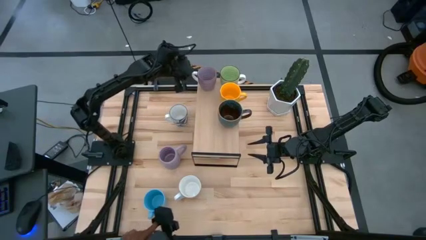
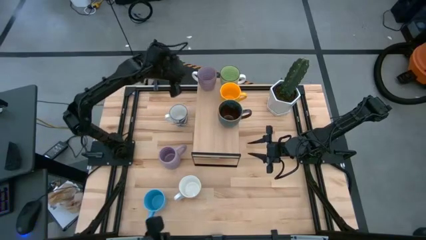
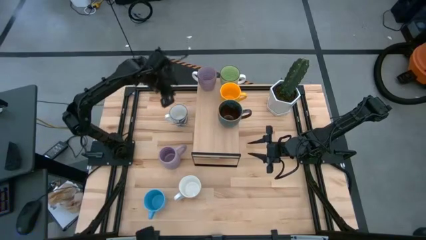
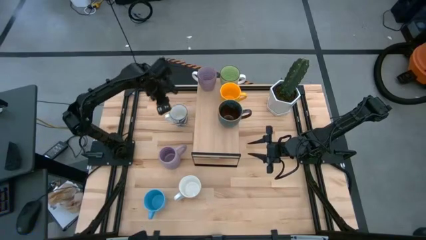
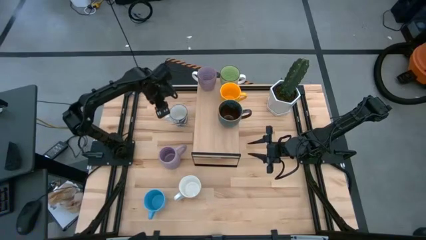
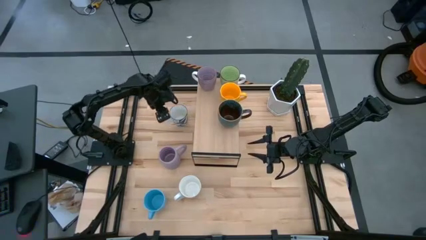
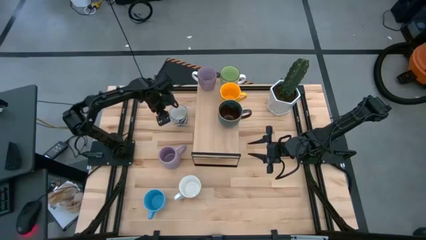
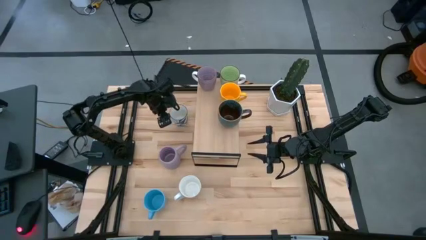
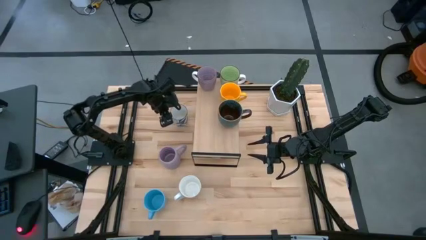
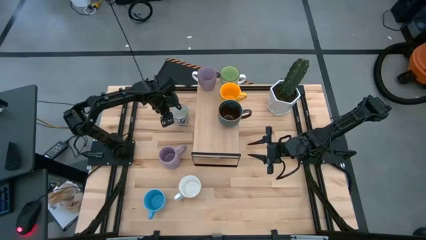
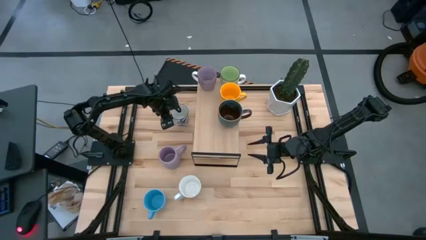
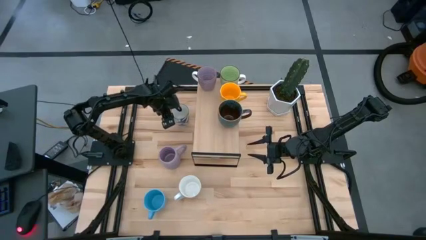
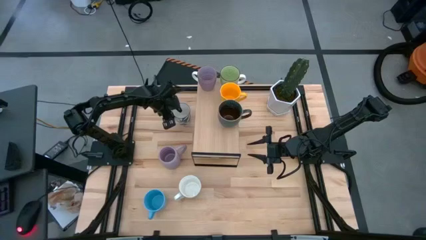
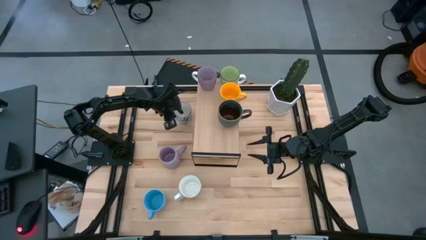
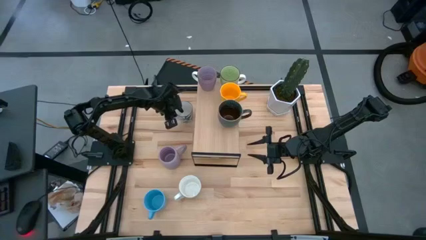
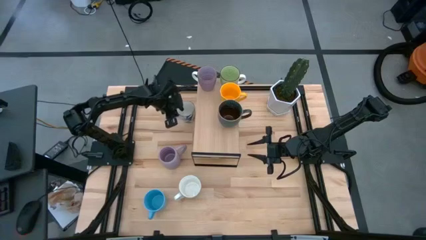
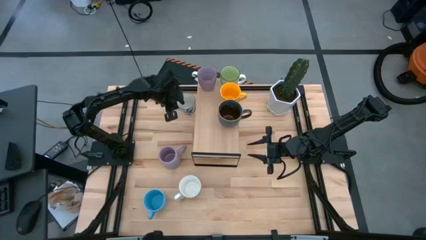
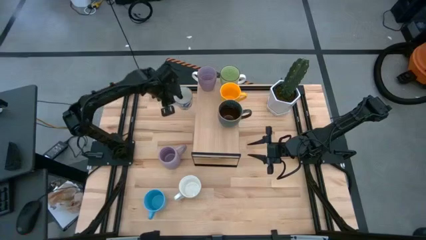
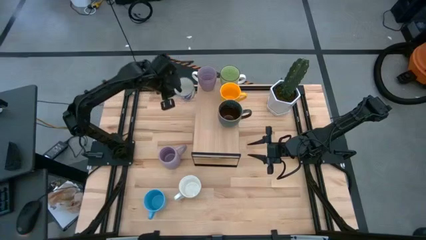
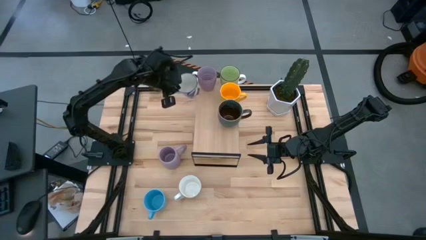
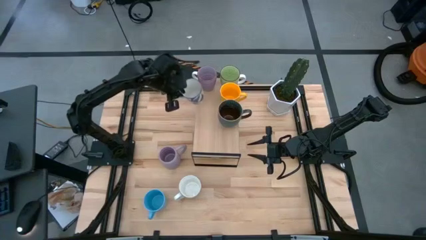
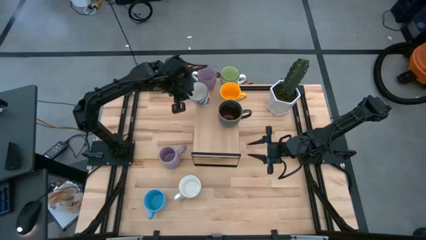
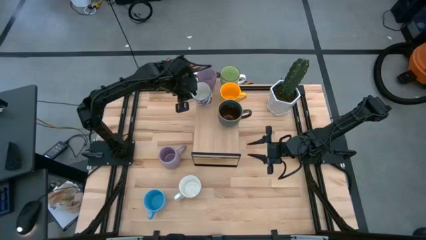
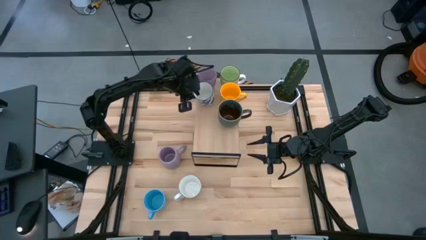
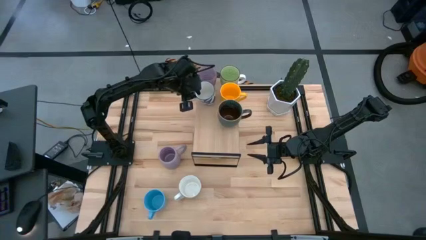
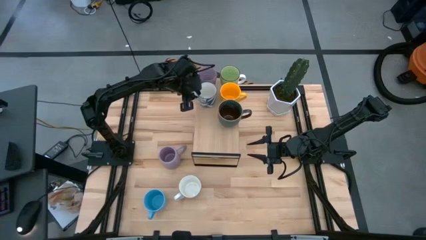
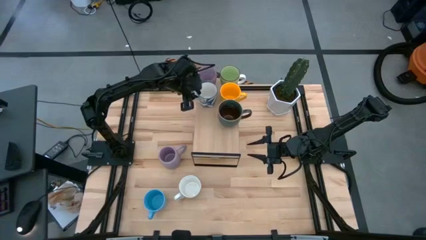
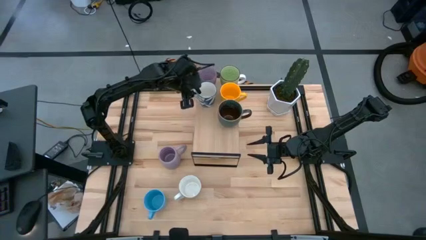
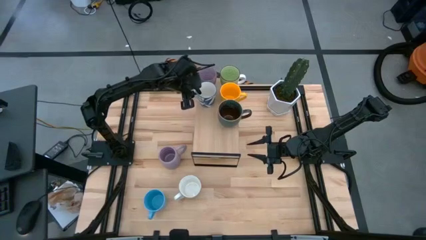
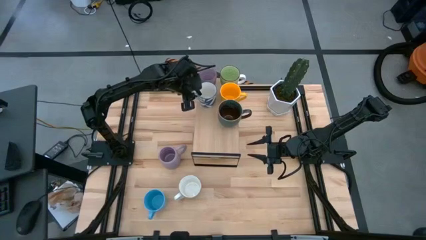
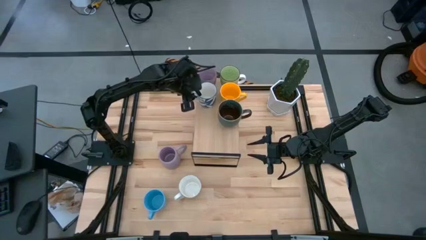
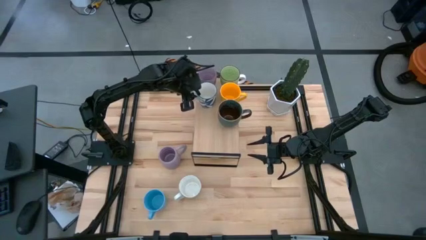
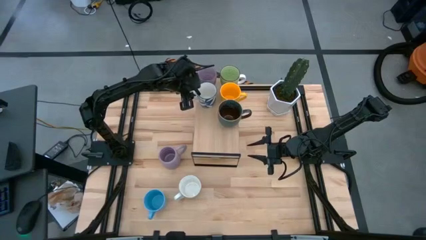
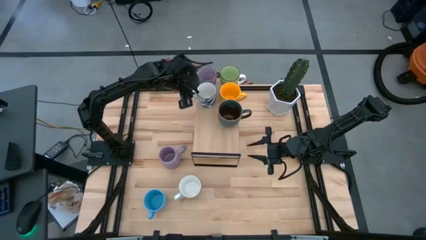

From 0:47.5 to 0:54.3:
Task: Place coffee mugs
Put the blue patterned mug on the shelf

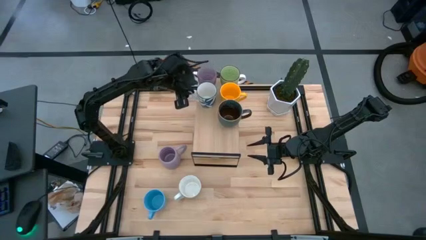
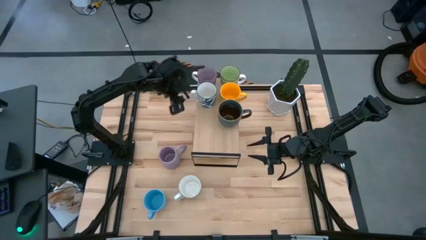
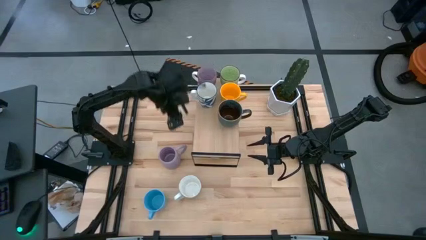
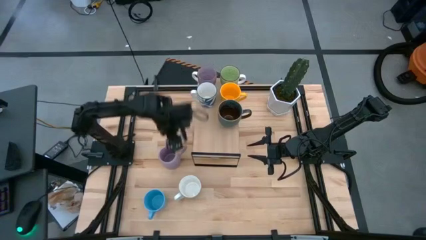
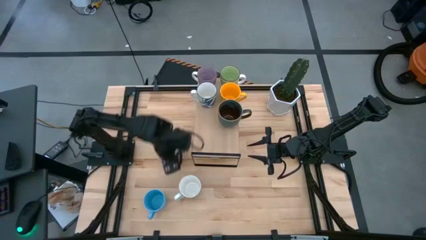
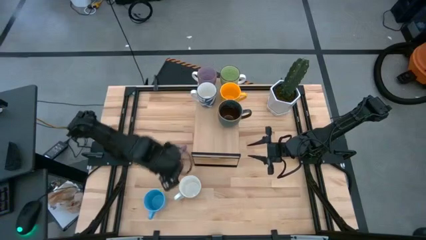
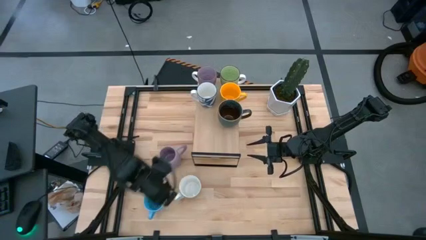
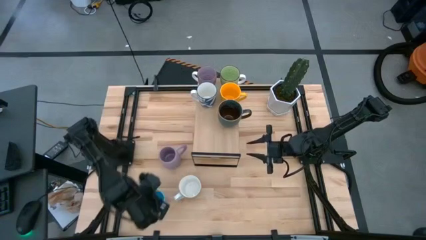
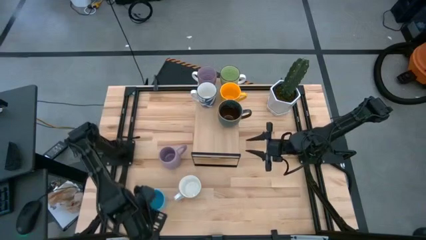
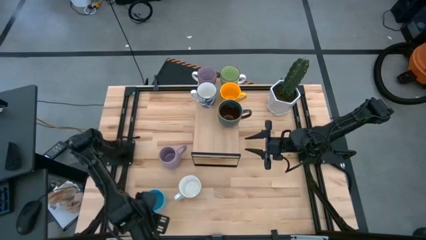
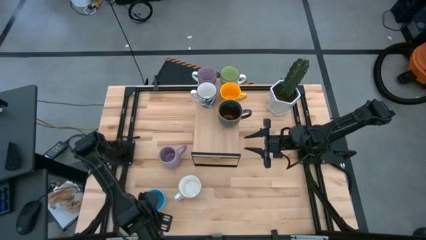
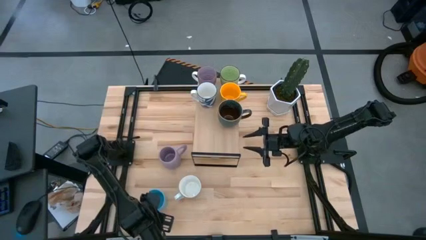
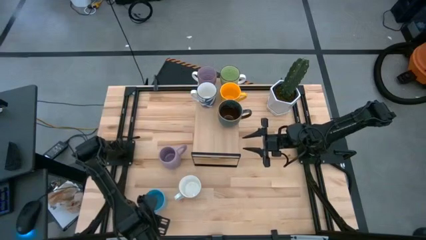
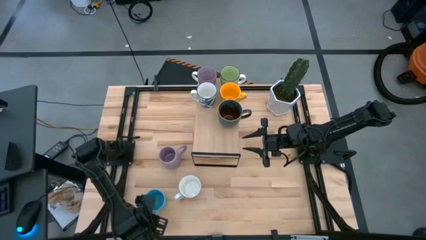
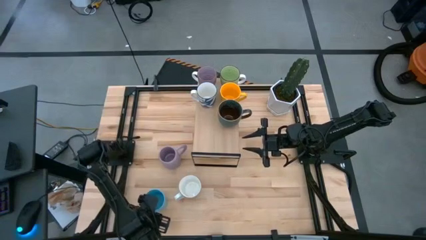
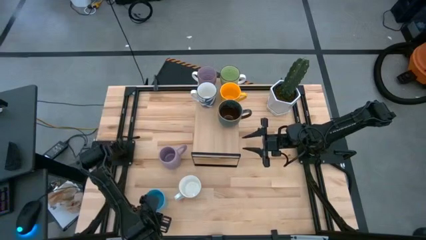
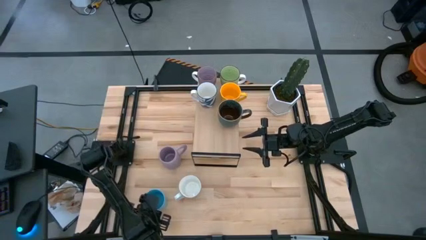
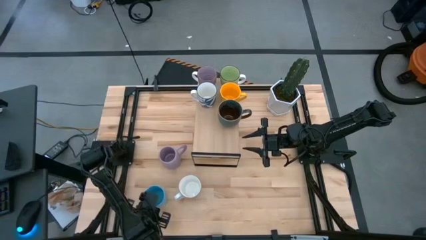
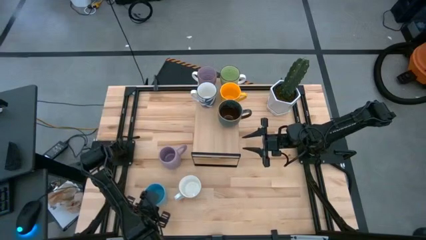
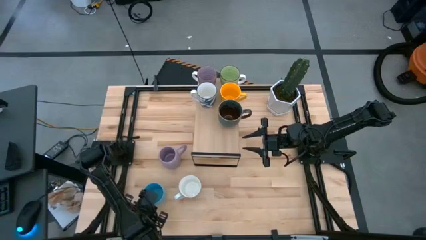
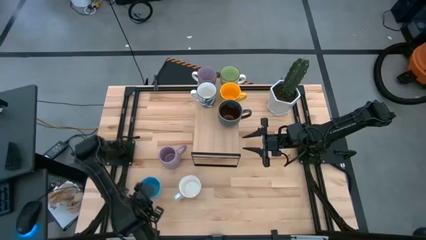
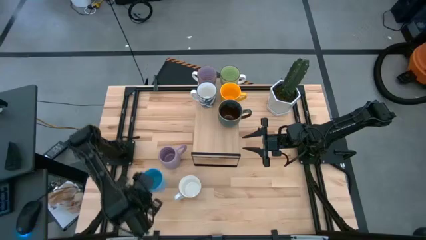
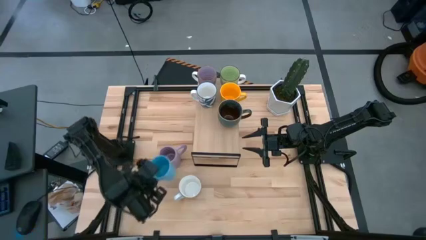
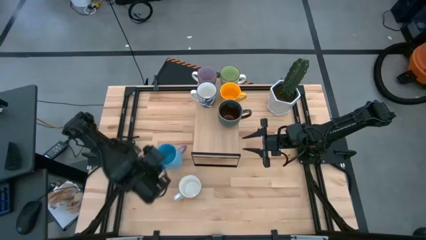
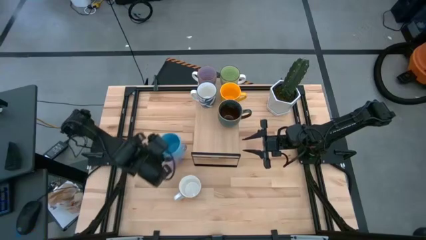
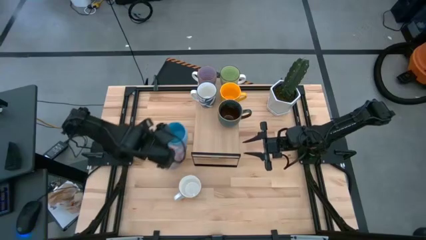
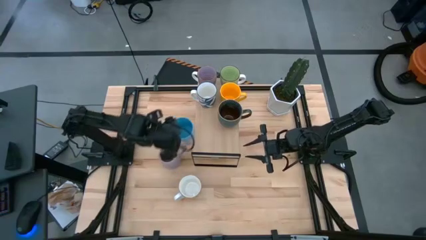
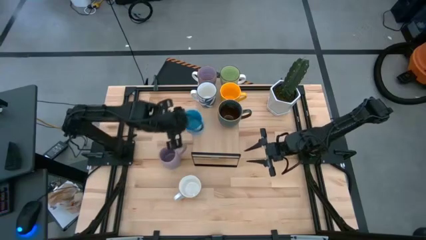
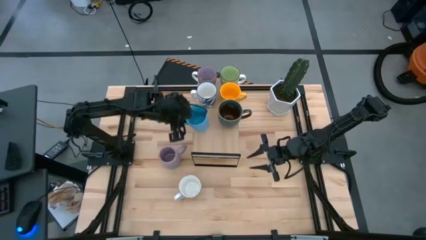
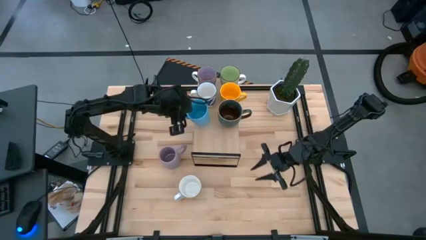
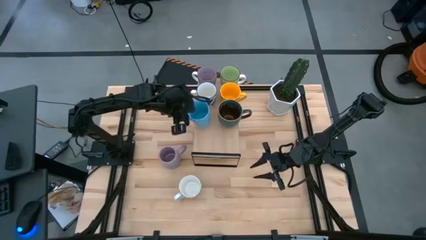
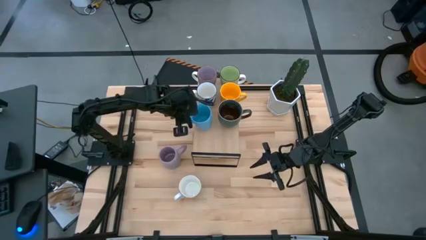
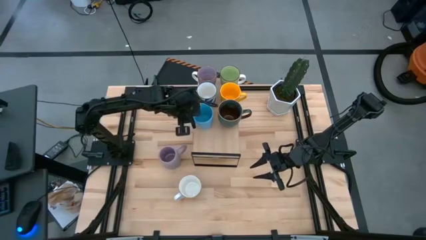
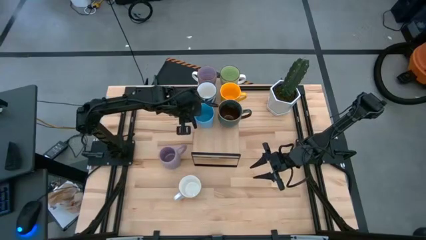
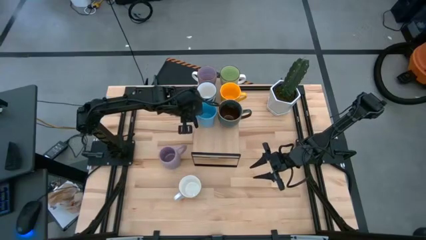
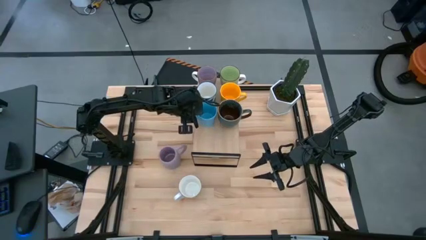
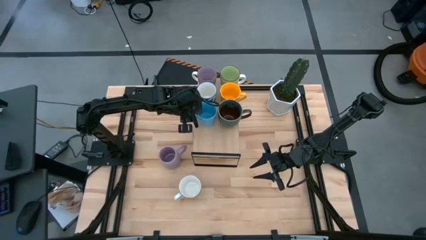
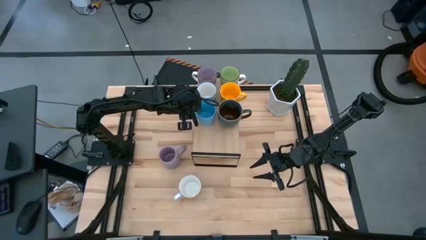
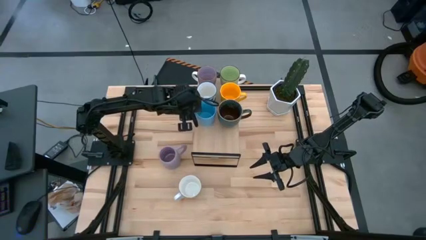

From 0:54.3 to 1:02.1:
Put the light blue mug on the shelf

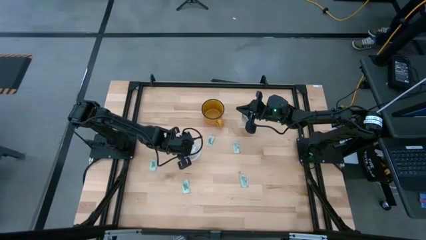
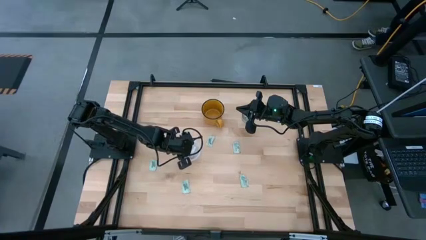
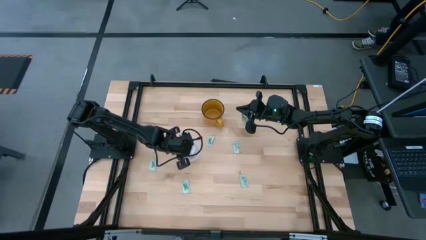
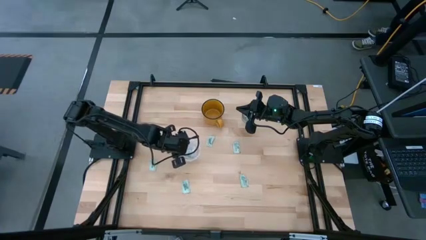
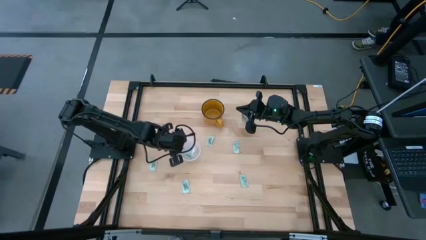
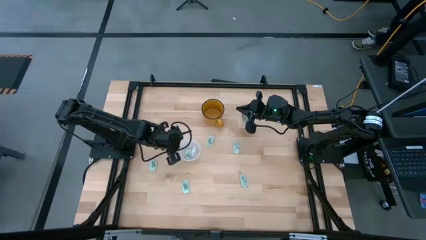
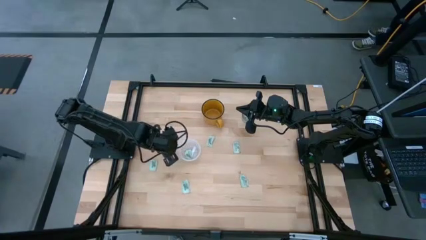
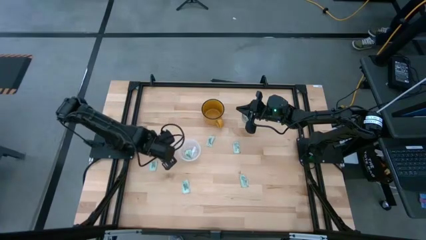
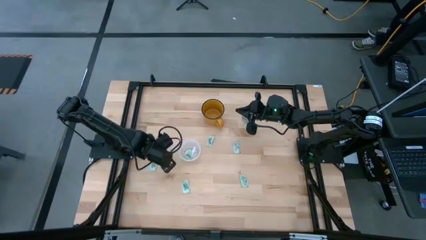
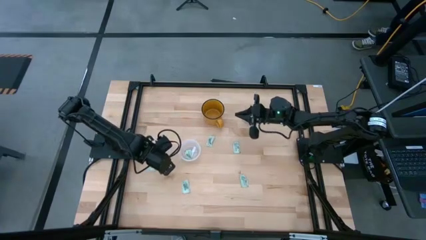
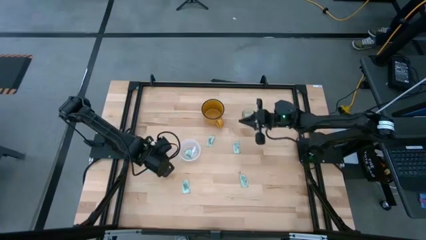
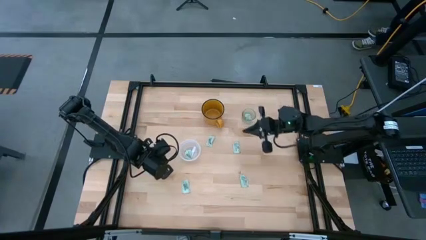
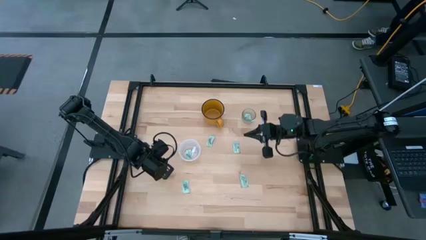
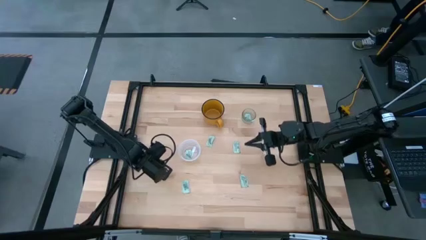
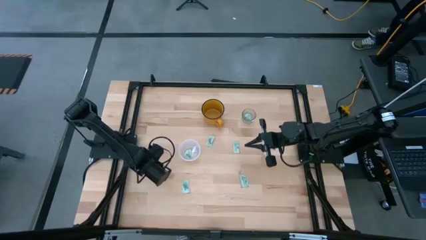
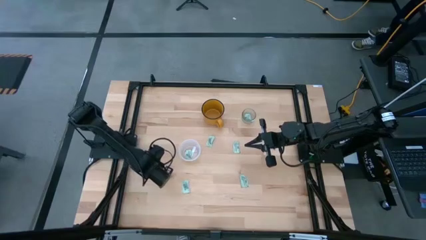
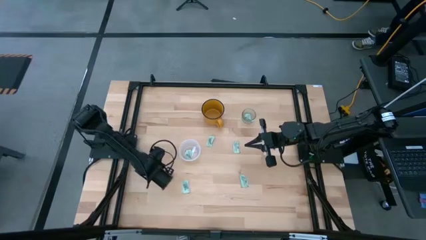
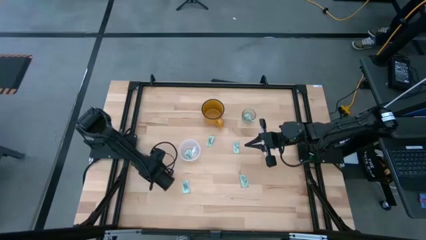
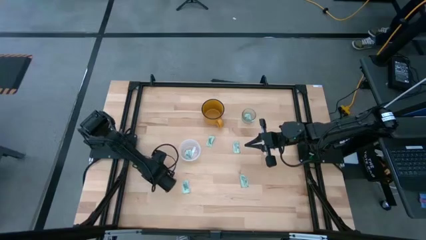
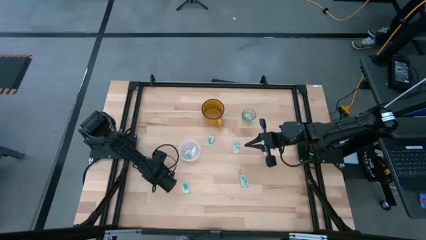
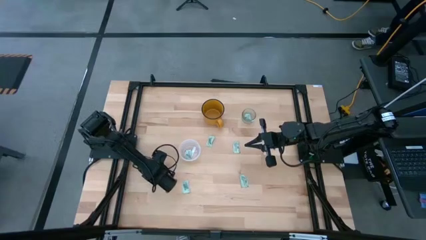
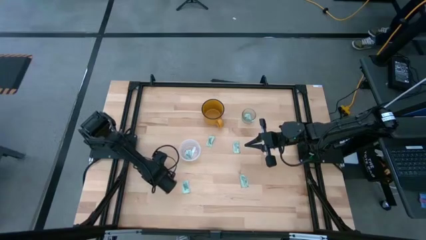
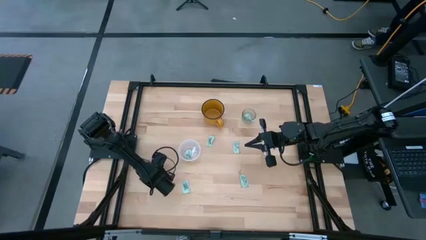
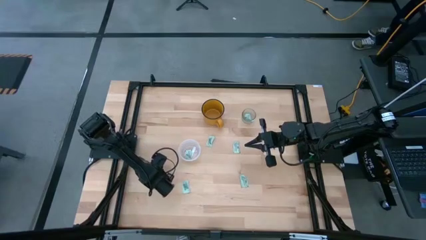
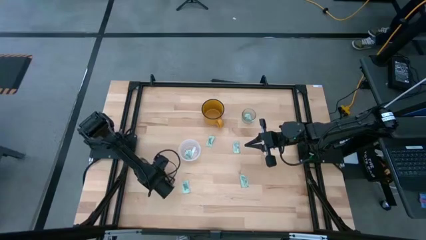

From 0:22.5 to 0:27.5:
Task: Pick and place Stevia / Truvia into bins
Put the stevia packet into the transparent container
